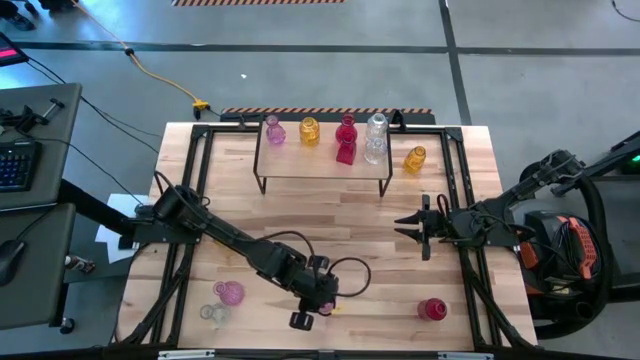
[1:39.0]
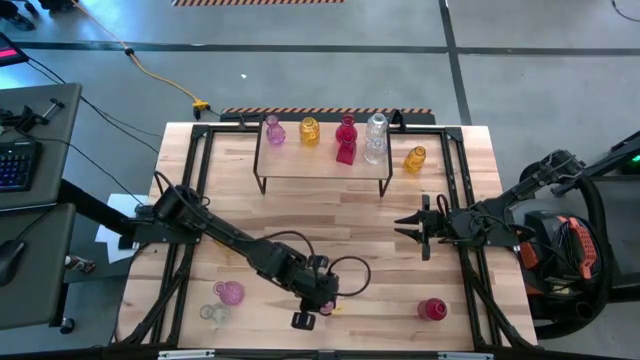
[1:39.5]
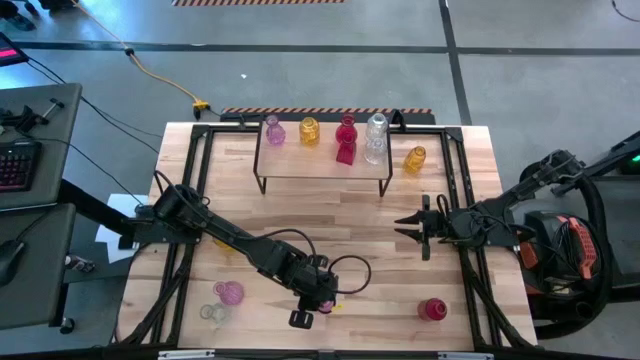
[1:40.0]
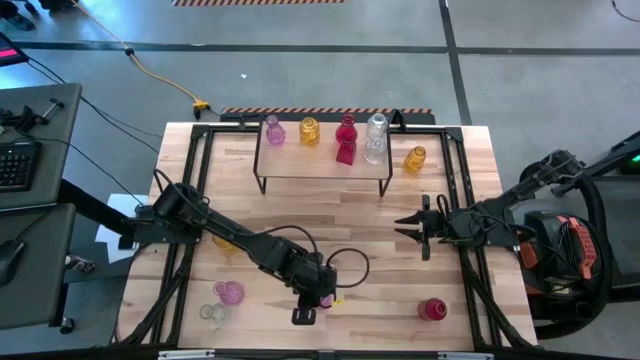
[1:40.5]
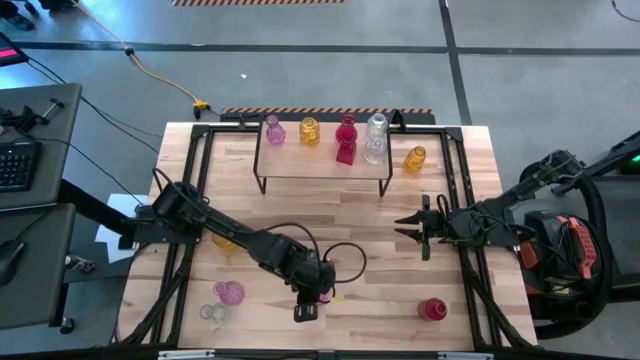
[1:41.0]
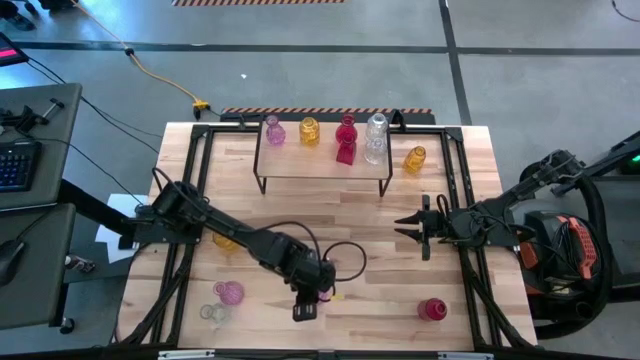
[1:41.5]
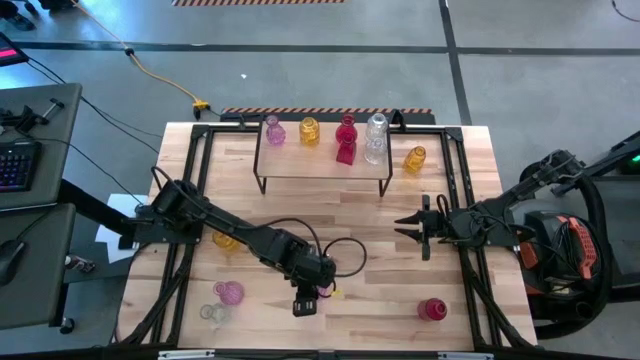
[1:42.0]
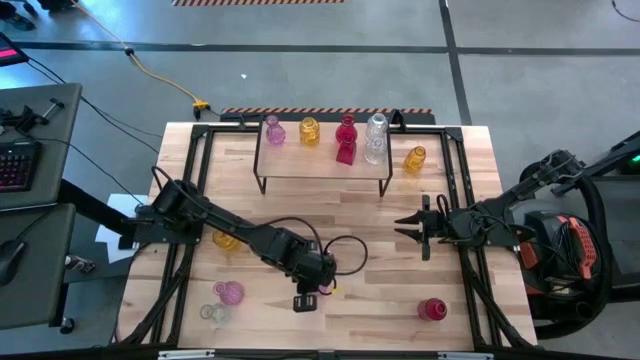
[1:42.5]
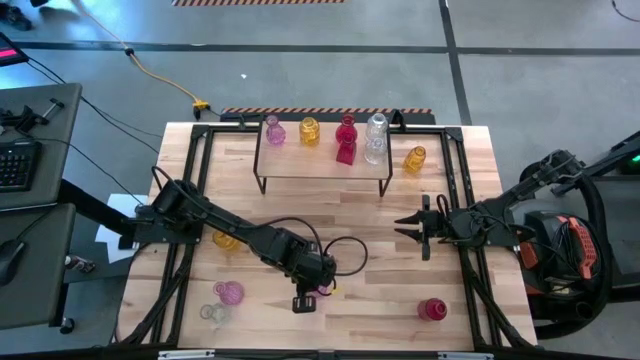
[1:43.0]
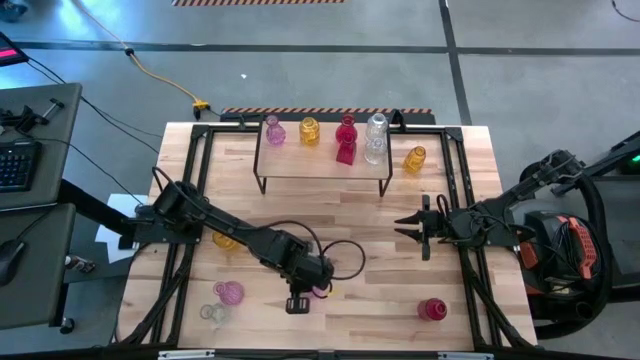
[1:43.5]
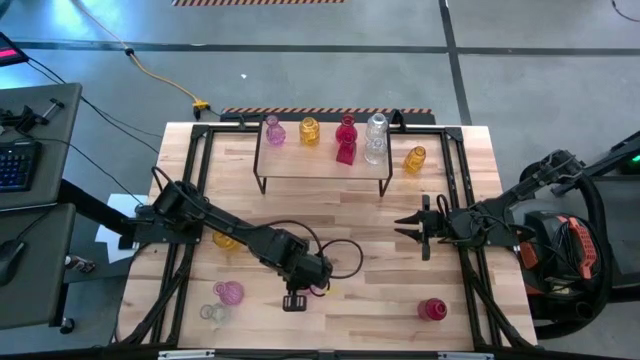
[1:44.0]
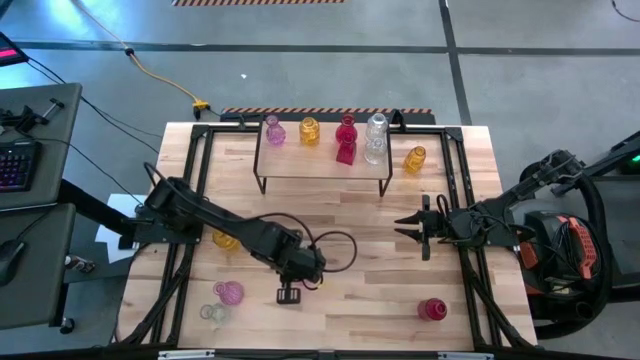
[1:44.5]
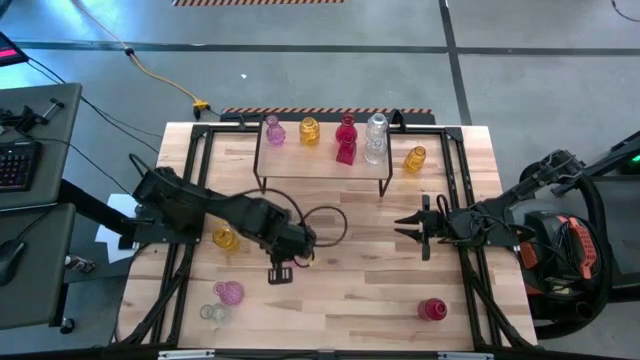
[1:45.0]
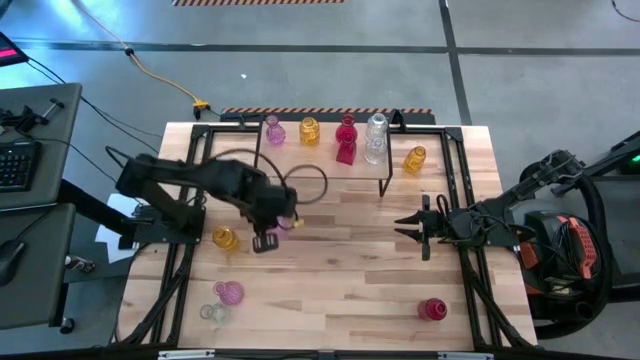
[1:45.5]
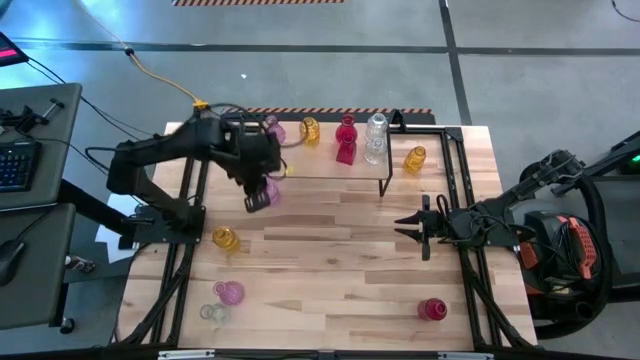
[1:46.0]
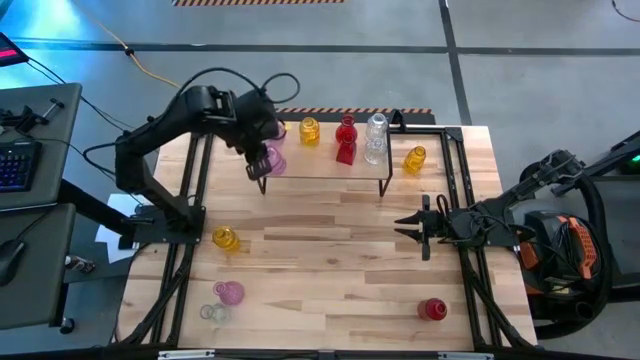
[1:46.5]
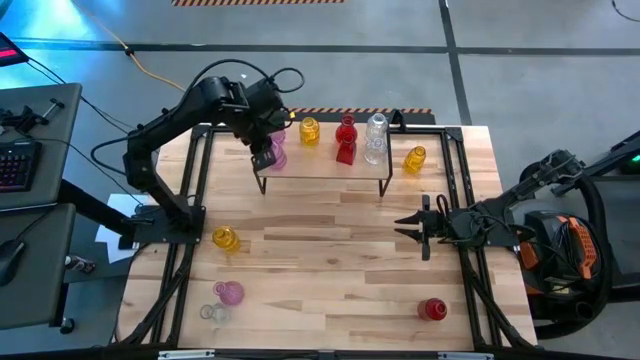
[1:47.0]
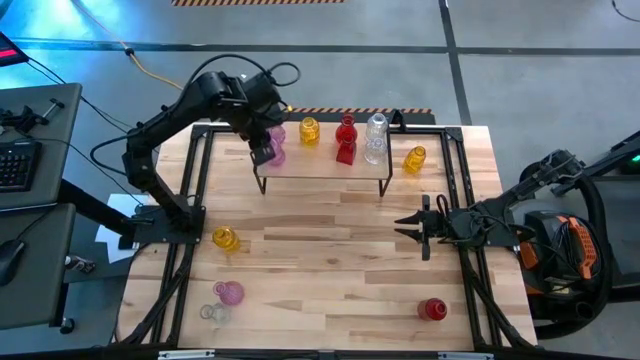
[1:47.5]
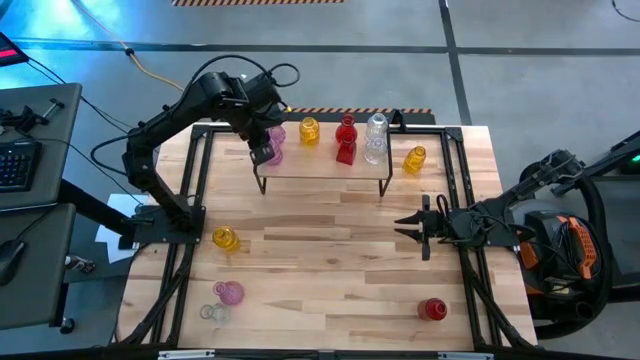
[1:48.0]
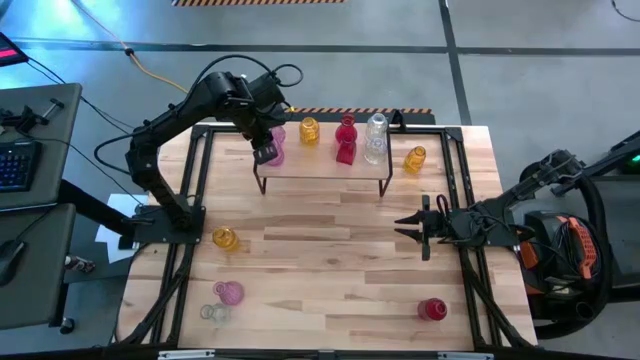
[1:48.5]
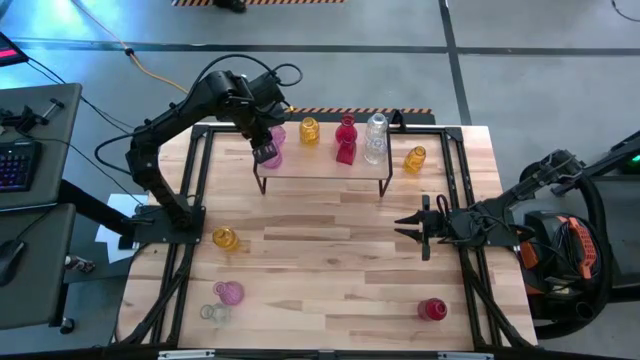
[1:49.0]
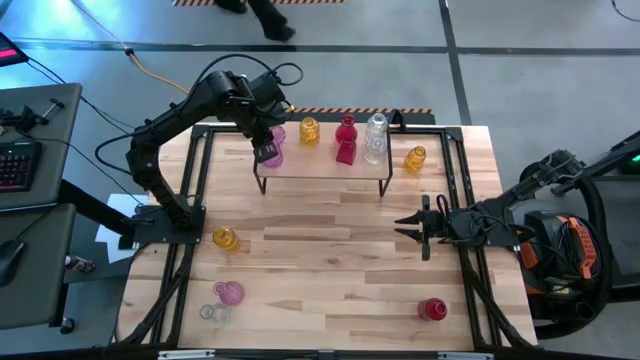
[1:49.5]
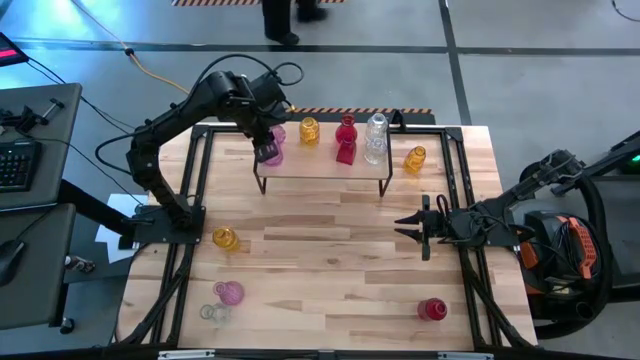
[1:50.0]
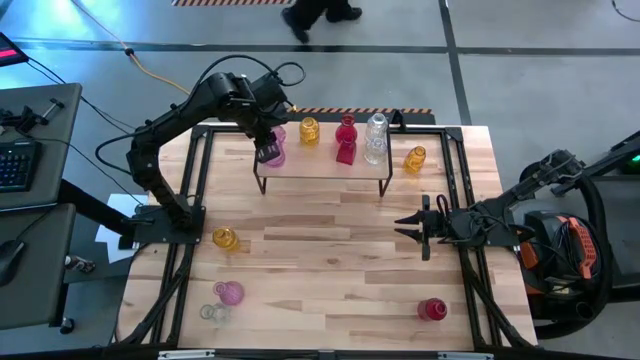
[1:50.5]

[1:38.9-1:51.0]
Task: sort vases onto shelf
Put the right purple vase on the shelf aligned with the other purple vase

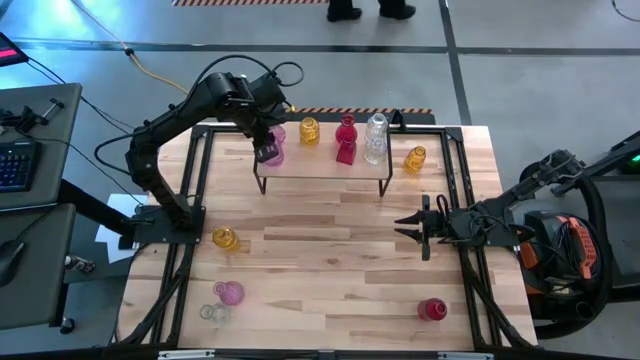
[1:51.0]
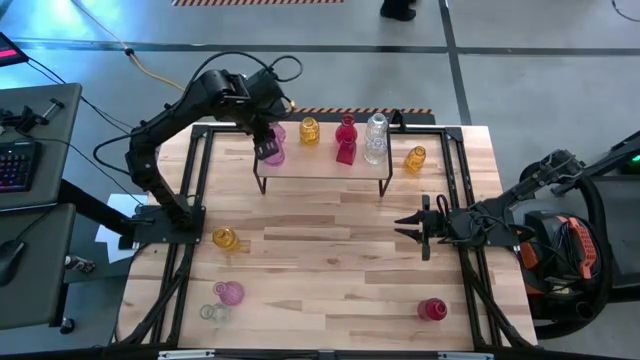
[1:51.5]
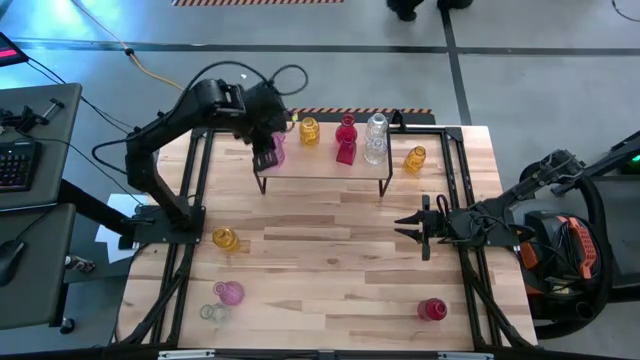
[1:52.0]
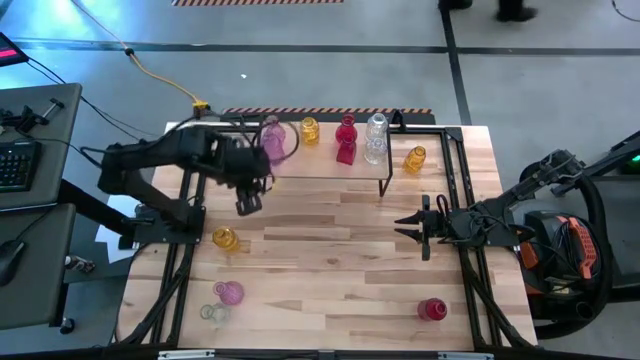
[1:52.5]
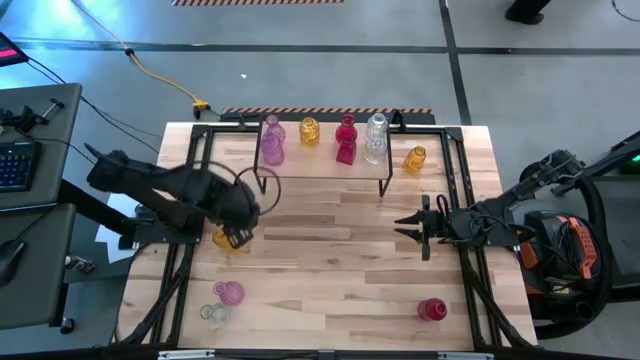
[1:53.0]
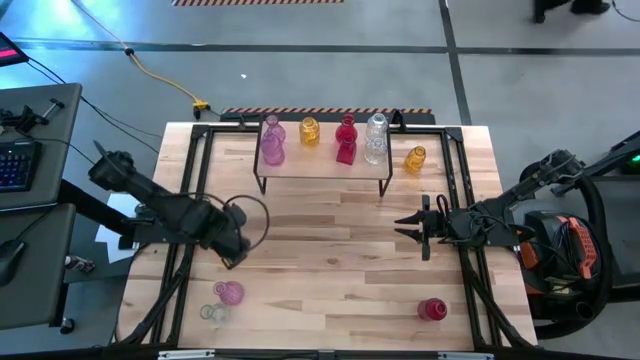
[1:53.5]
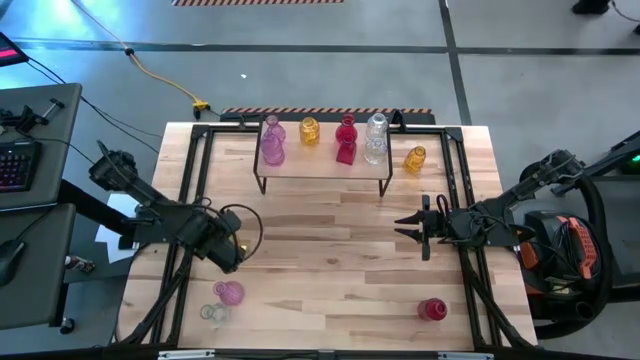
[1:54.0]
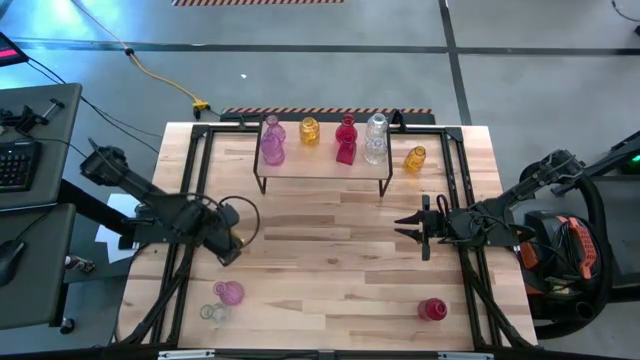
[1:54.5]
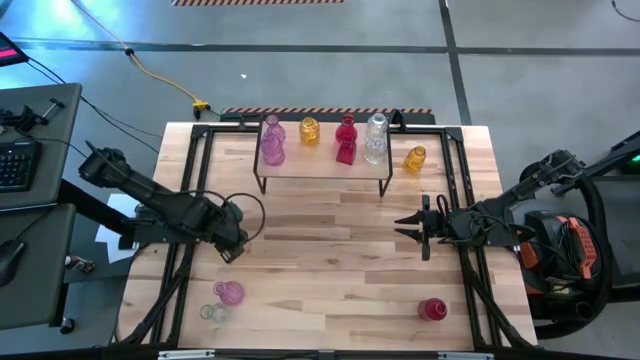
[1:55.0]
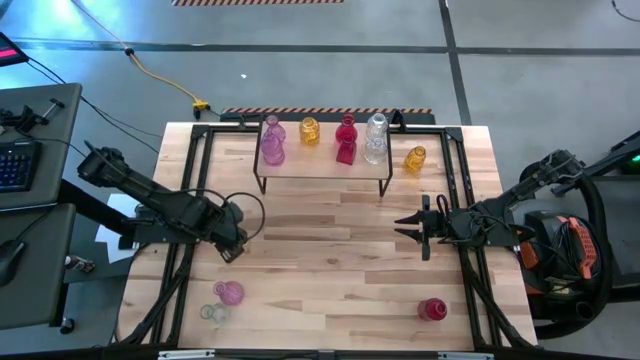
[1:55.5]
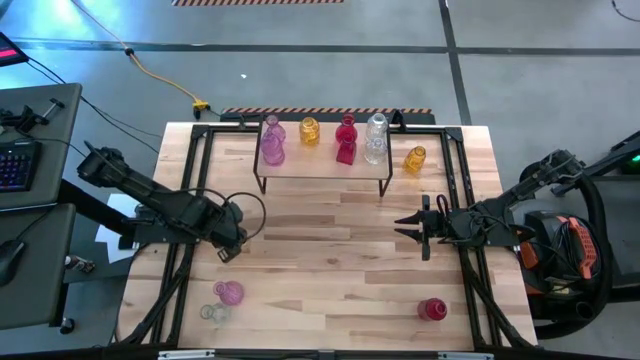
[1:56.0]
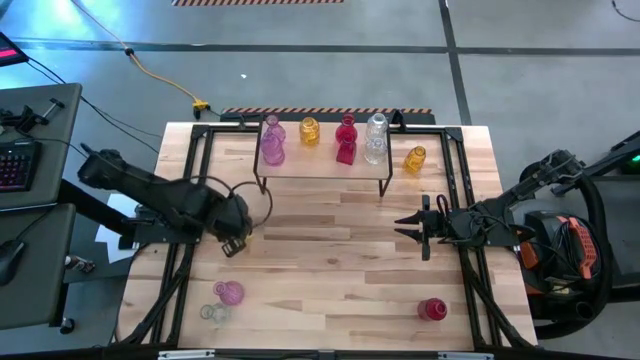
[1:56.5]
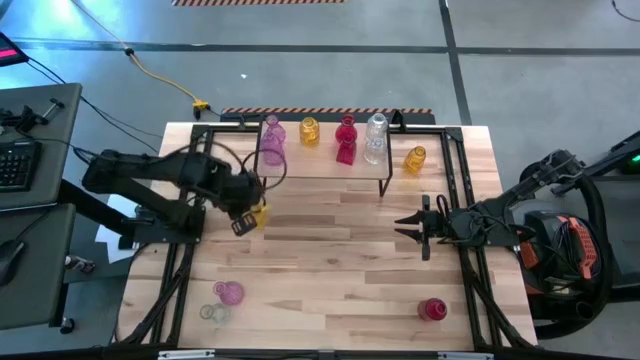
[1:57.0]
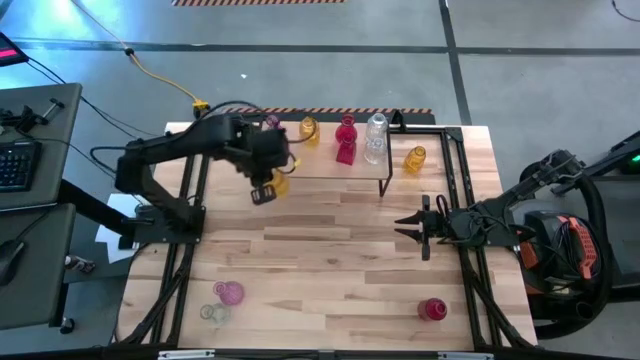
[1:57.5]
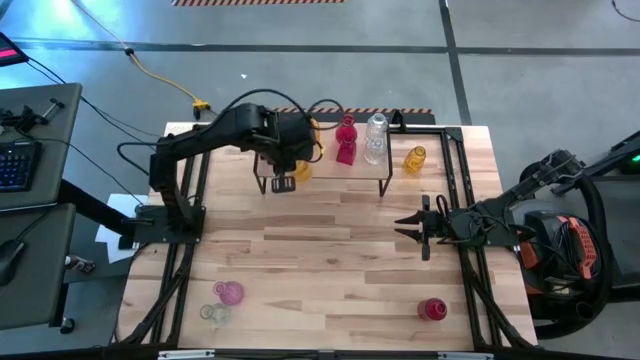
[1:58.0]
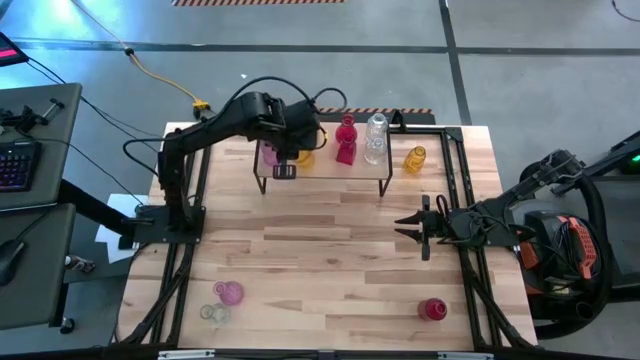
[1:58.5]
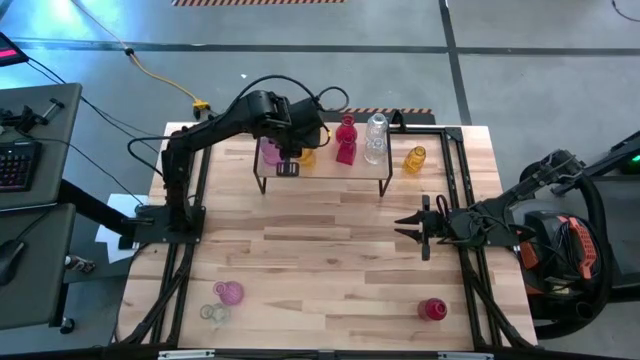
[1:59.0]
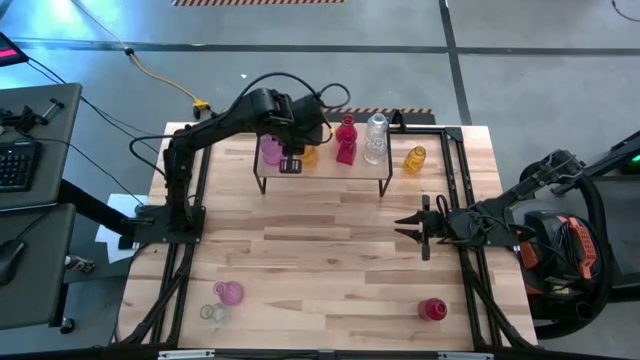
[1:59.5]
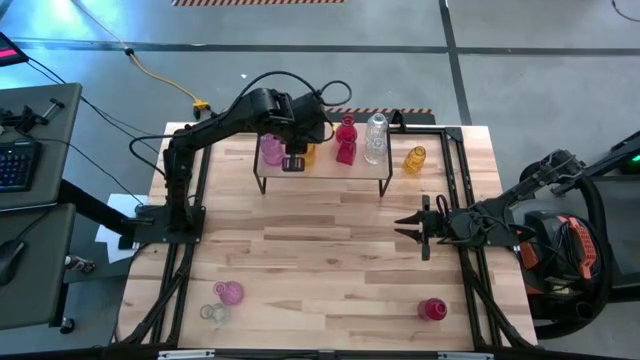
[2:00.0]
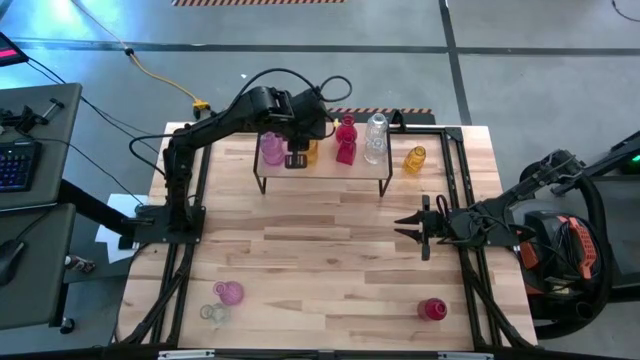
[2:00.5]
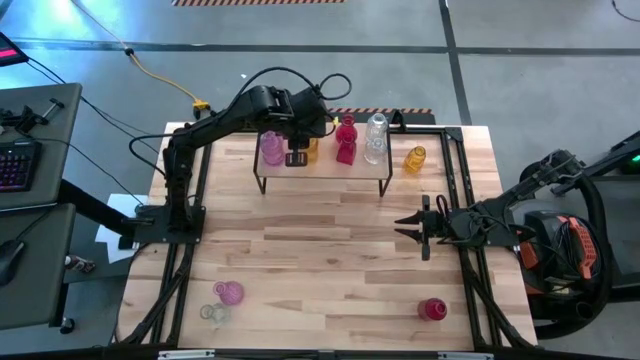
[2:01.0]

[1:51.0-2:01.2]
Put the bottom yellow vase on the shelf aligned with the other yellow vase
